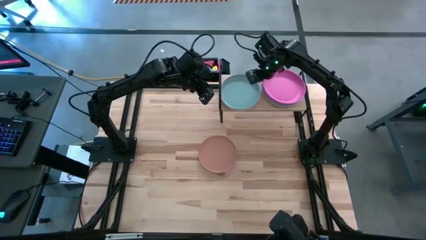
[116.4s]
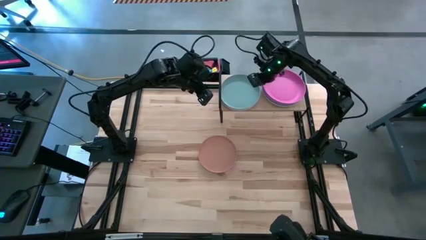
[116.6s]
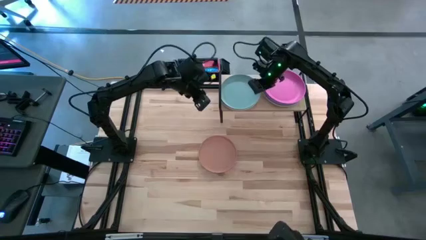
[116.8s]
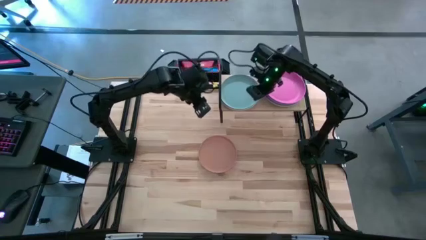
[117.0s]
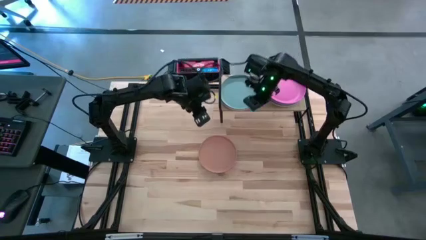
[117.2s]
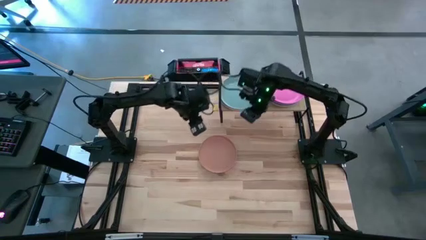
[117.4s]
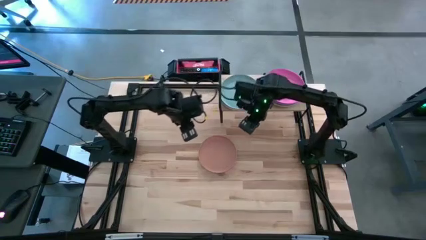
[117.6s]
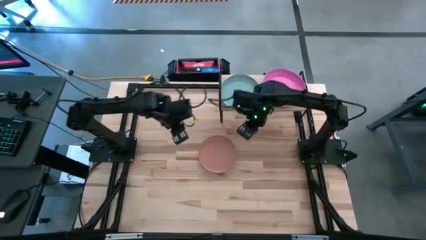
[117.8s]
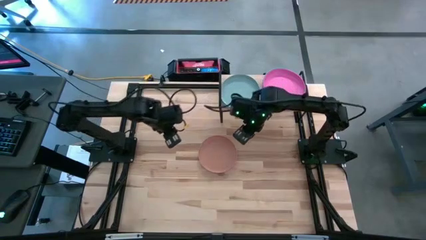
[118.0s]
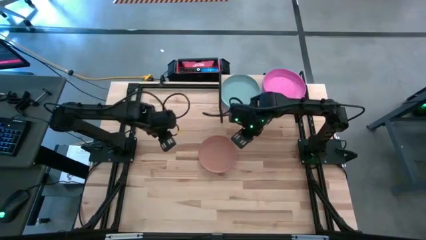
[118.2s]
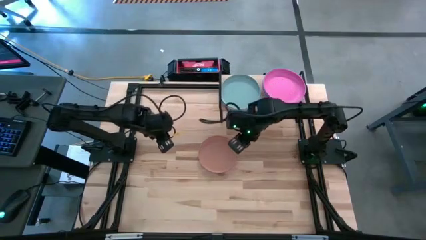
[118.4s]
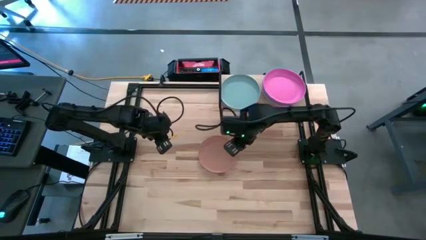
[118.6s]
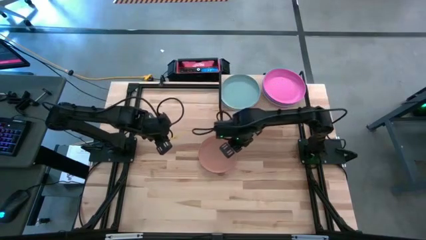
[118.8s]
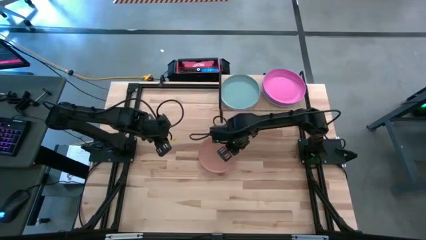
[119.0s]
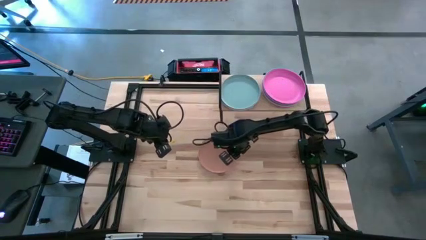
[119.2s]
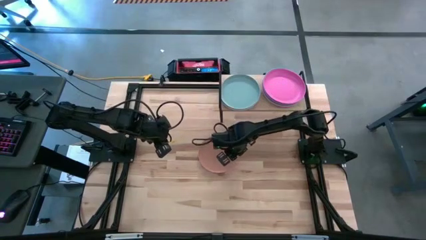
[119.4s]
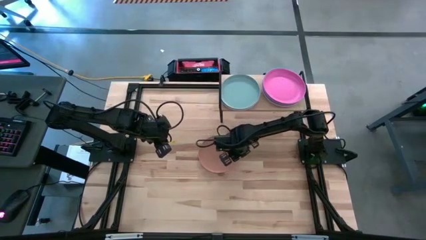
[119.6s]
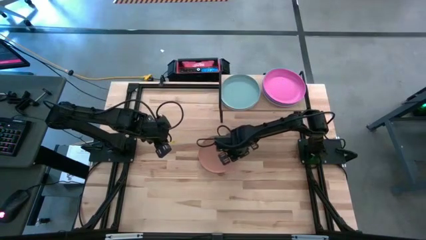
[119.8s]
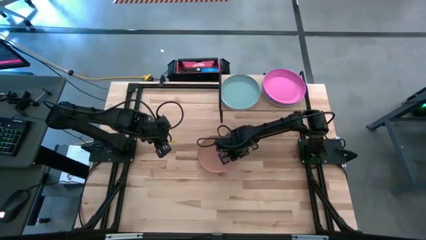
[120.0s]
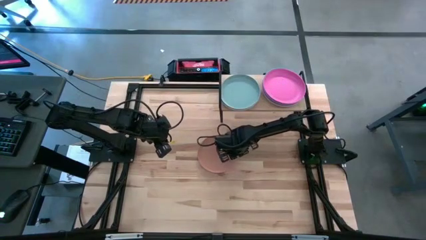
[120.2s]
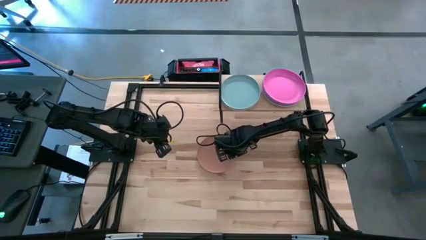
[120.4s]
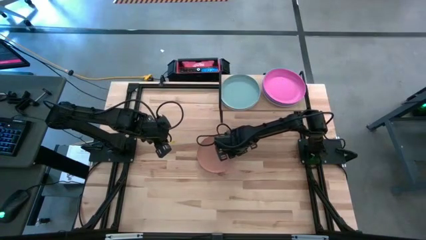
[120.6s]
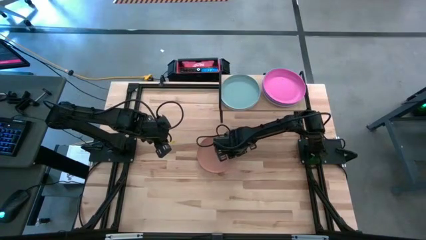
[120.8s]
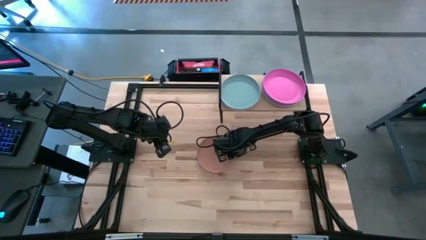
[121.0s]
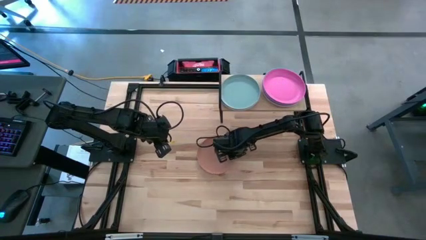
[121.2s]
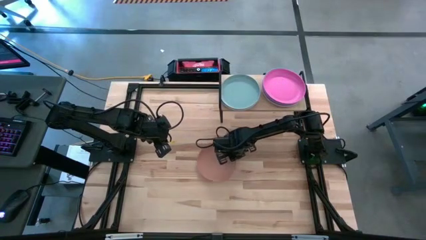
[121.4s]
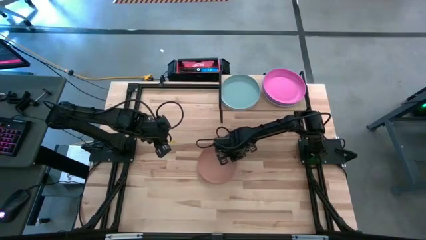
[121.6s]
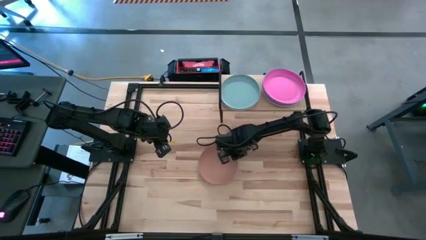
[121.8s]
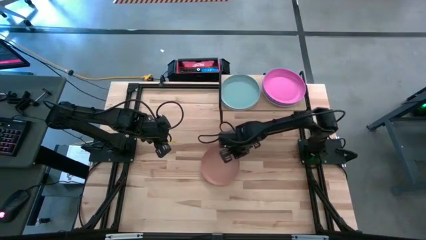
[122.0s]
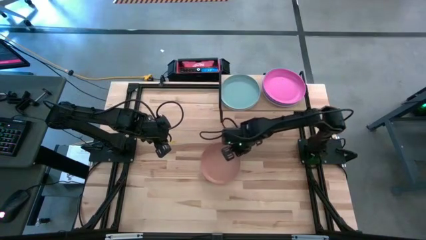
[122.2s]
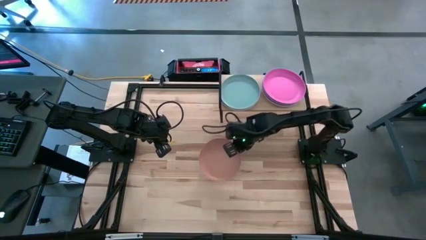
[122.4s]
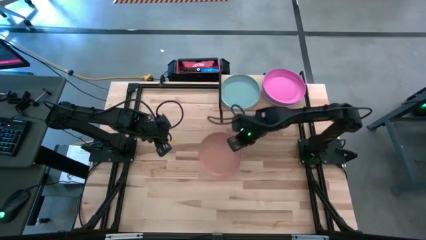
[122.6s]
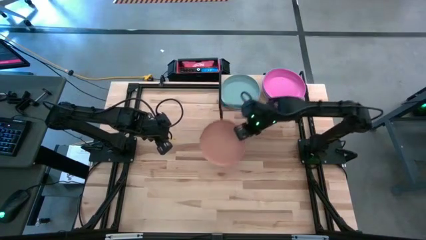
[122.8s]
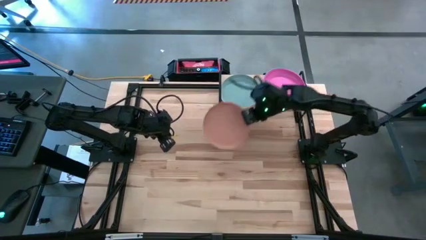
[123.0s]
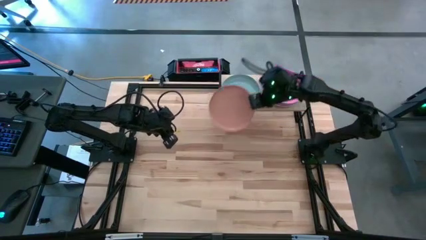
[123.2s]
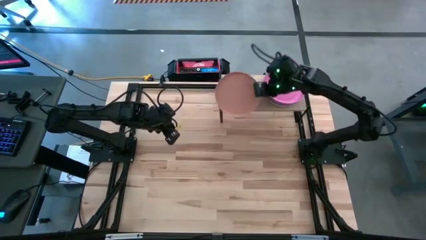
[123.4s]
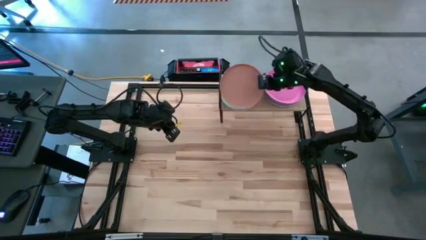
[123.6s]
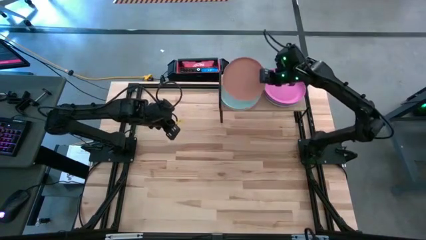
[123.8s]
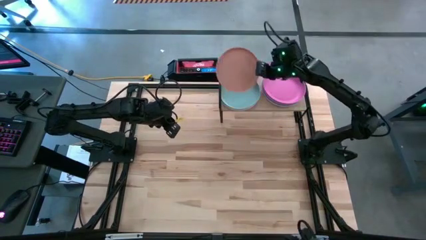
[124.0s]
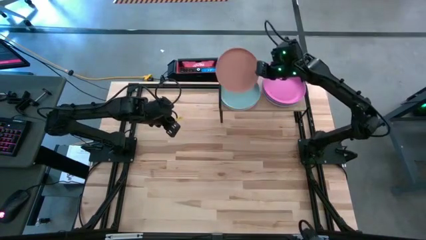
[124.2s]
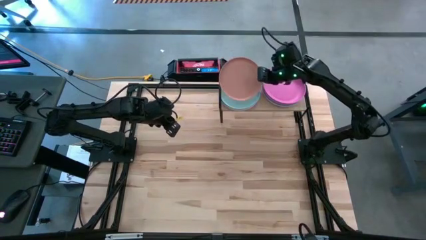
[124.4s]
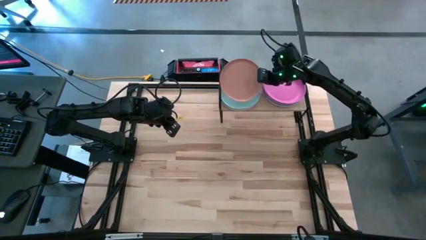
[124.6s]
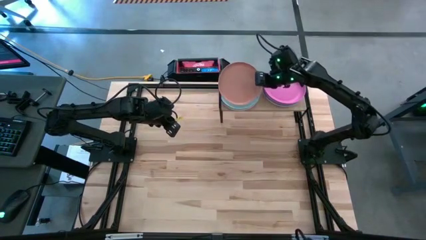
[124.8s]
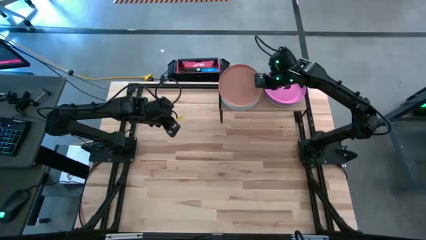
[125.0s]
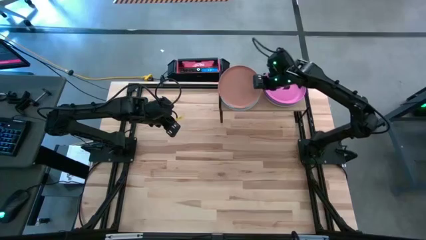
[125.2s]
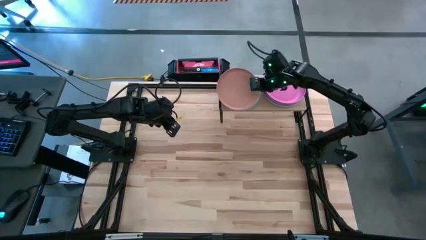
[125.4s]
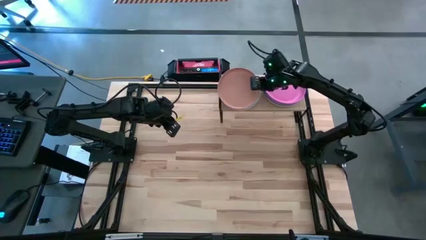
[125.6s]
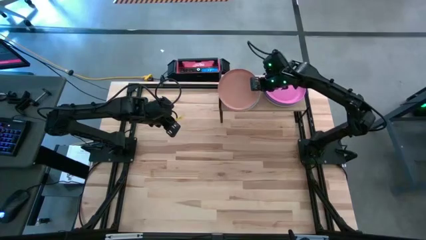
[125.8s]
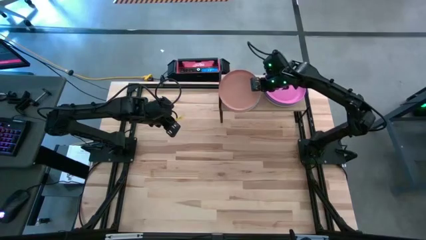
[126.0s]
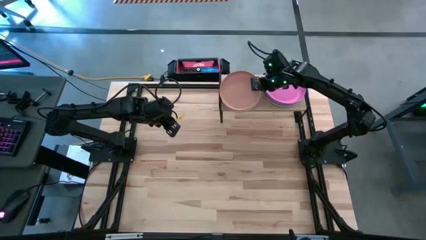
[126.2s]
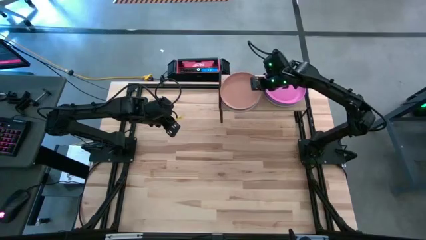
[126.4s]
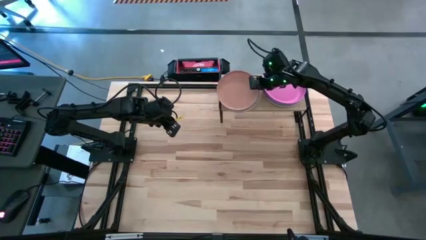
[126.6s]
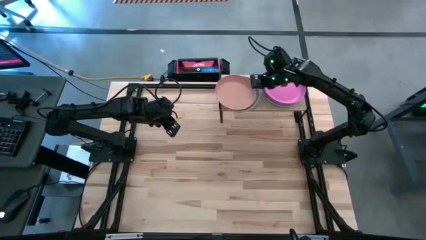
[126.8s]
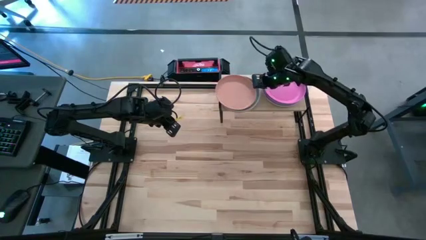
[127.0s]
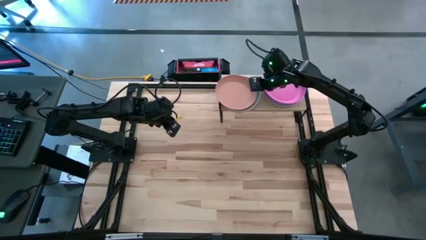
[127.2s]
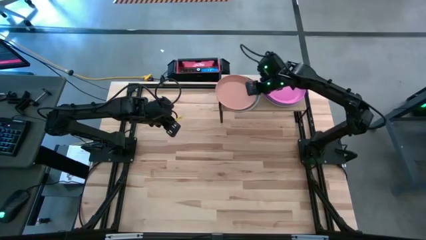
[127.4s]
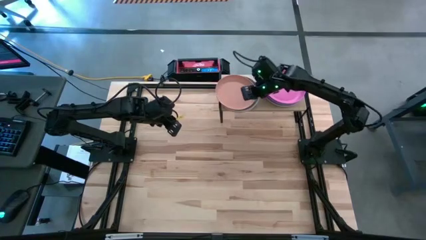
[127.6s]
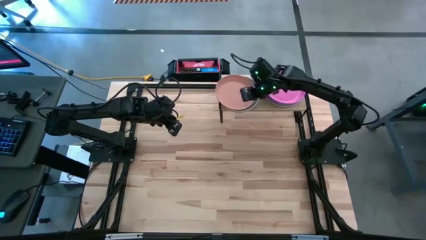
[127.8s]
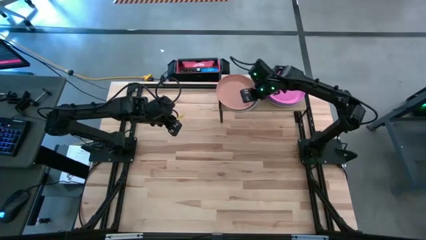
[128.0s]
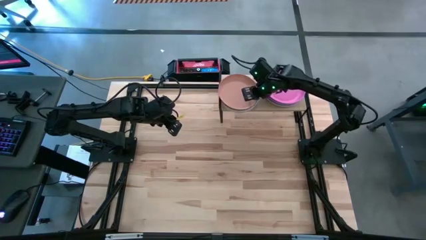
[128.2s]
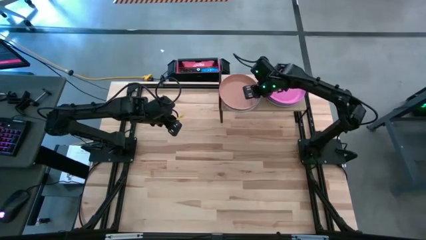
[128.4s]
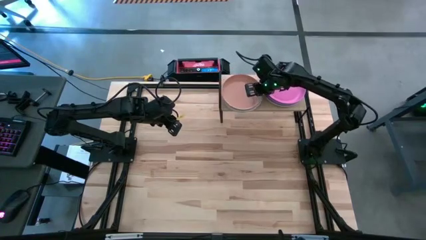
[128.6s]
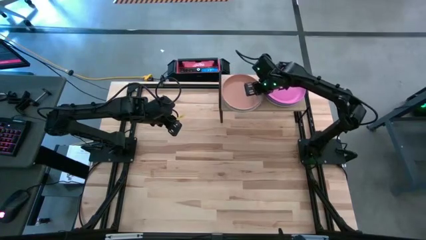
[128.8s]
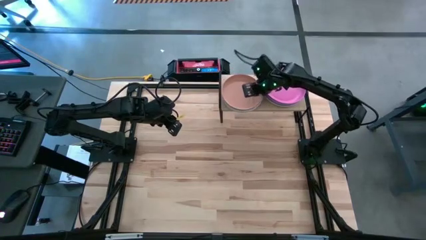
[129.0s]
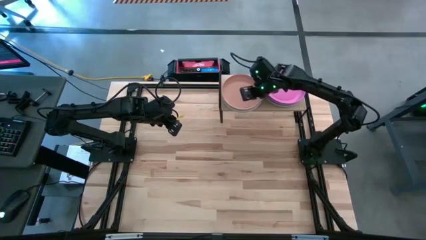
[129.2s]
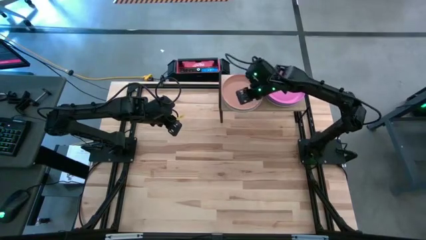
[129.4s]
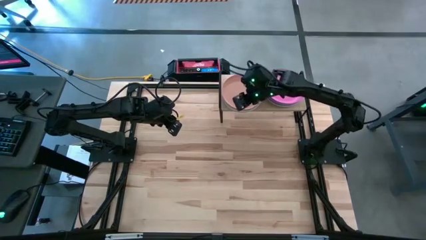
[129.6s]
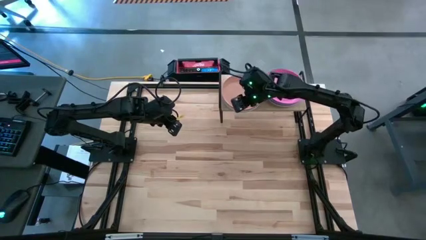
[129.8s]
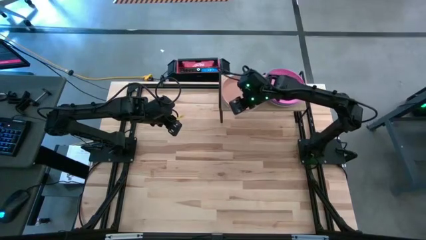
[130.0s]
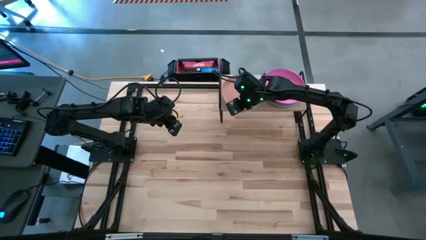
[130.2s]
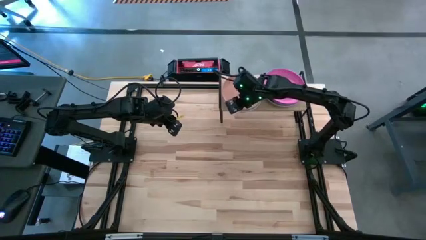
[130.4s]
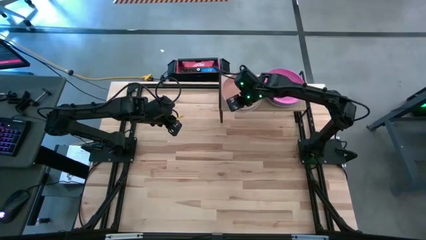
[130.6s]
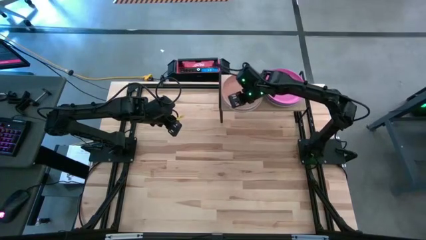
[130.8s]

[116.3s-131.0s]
Task: Place and stack plates onto a shelf
Stack the brown plate on top of the light blue plate on the shelf

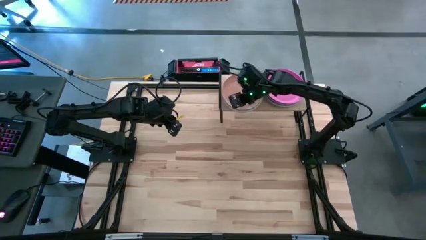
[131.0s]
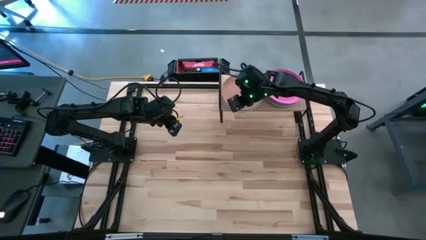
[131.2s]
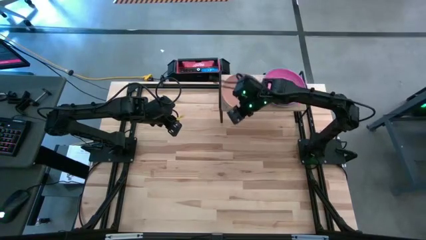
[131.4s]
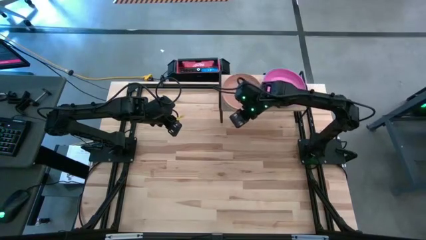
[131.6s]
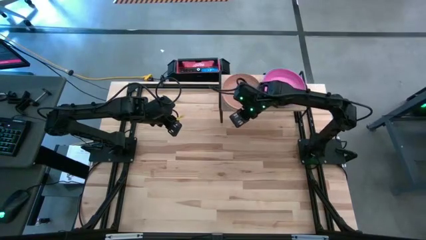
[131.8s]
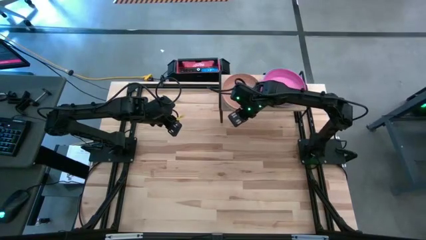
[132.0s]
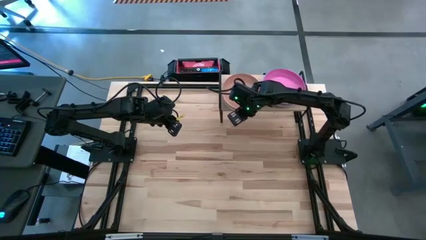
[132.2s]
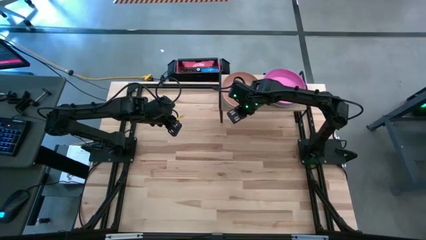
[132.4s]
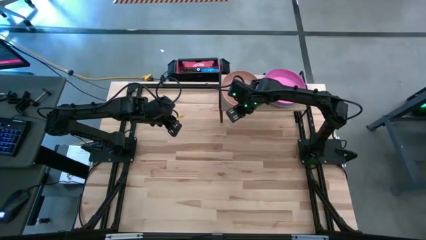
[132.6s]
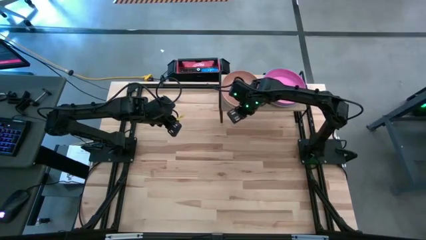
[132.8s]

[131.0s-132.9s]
Adjust the left stacked plates on the shelf

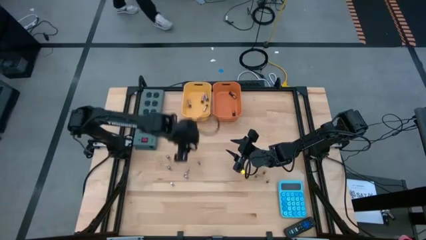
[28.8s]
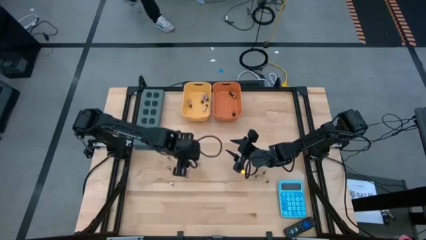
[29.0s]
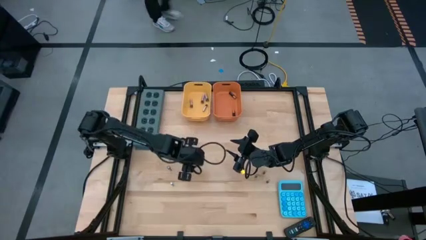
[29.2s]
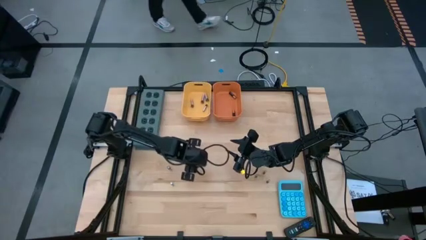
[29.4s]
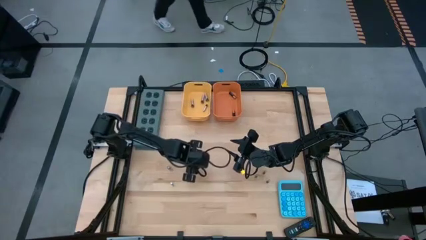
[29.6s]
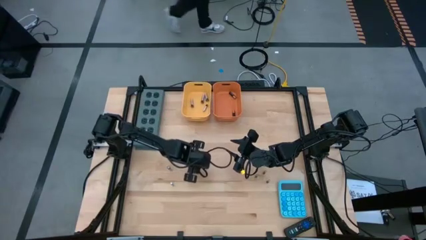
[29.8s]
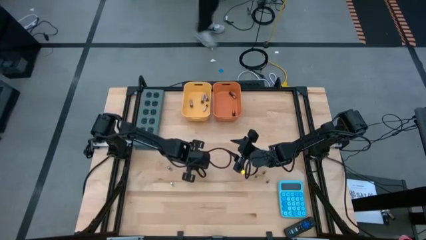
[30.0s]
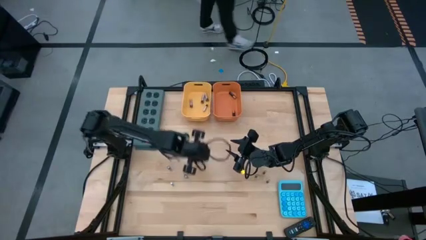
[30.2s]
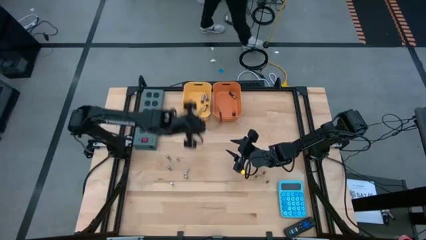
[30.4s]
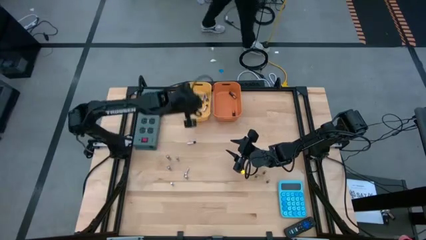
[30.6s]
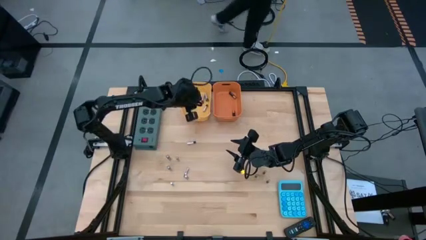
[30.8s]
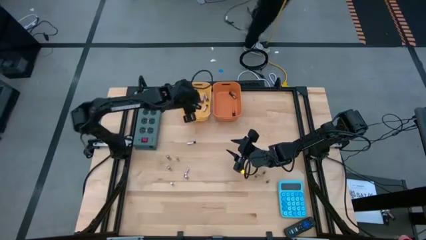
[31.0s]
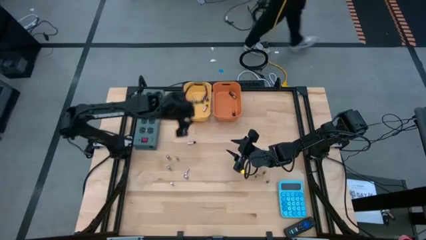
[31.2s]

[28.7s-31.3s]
Task: Sort batteries
Put the silver battery into the yellow bin
